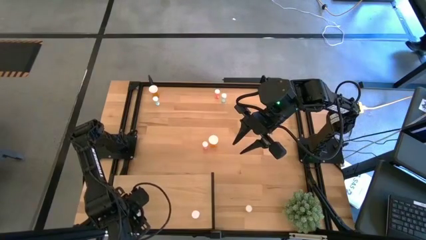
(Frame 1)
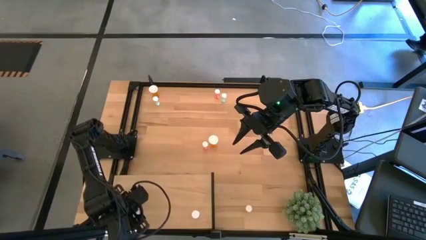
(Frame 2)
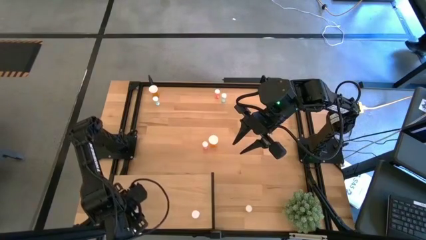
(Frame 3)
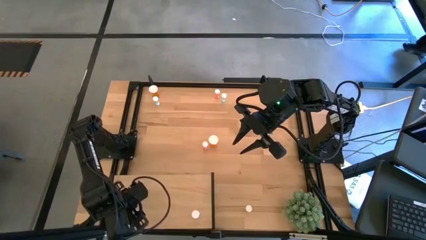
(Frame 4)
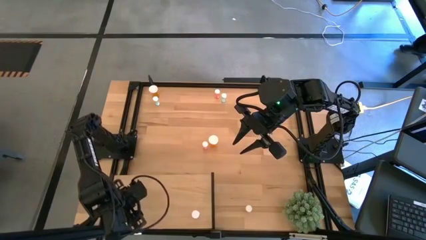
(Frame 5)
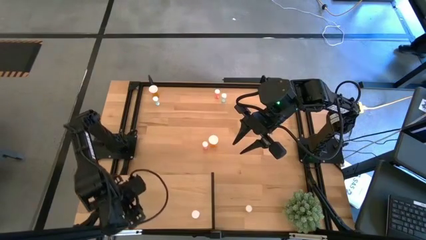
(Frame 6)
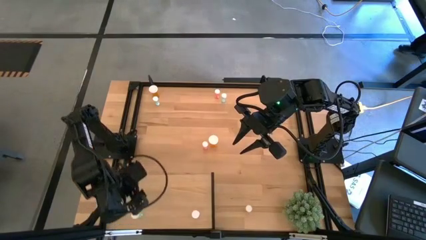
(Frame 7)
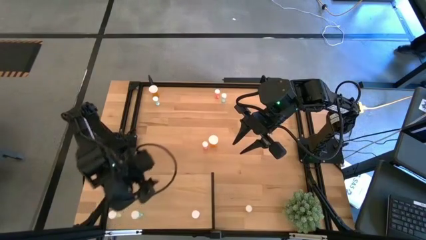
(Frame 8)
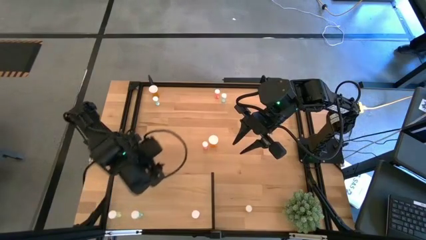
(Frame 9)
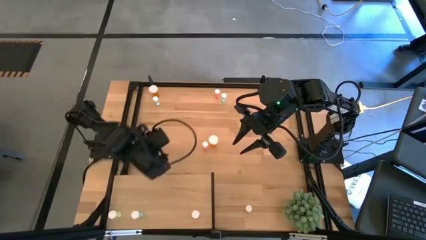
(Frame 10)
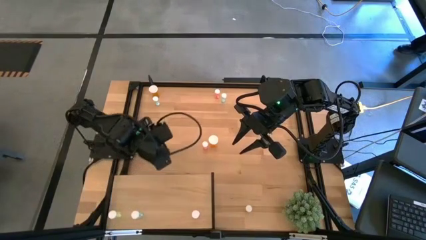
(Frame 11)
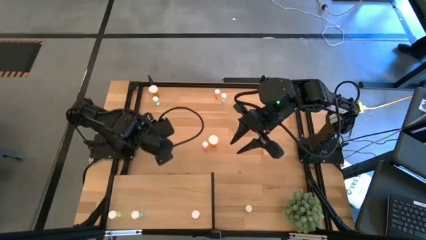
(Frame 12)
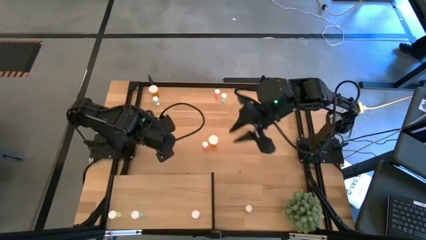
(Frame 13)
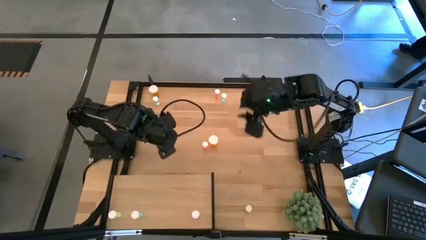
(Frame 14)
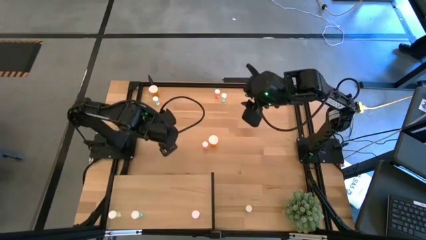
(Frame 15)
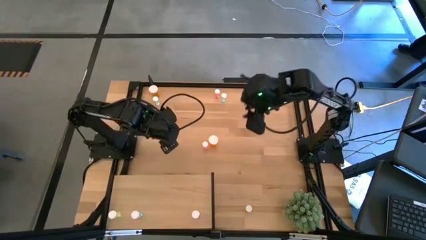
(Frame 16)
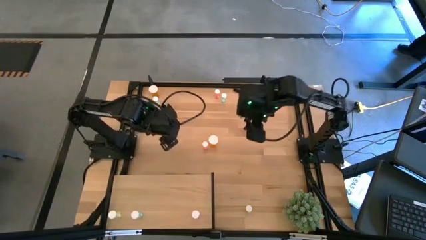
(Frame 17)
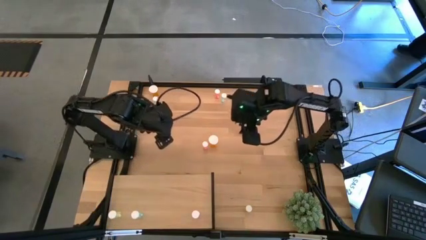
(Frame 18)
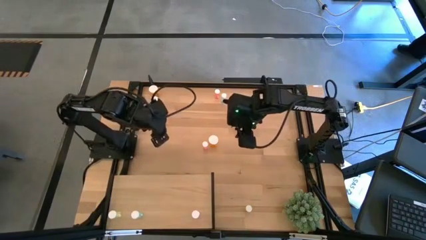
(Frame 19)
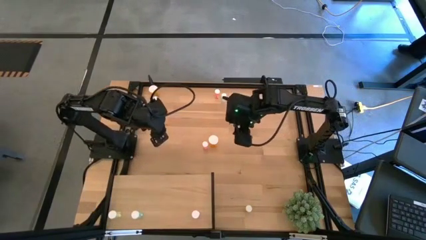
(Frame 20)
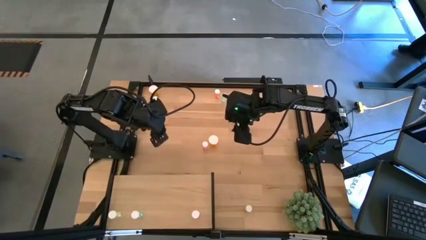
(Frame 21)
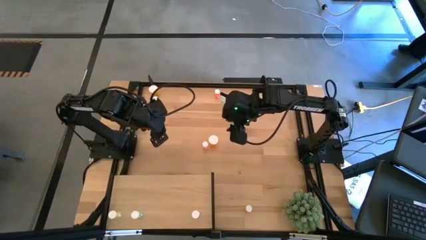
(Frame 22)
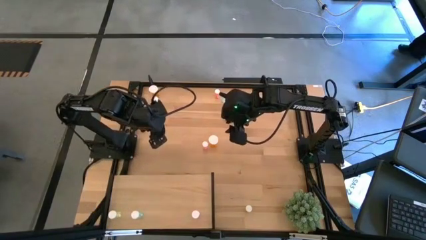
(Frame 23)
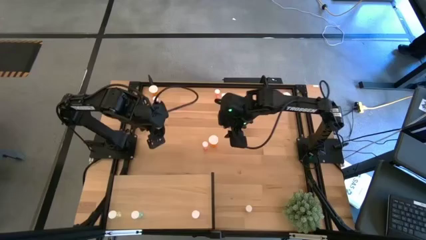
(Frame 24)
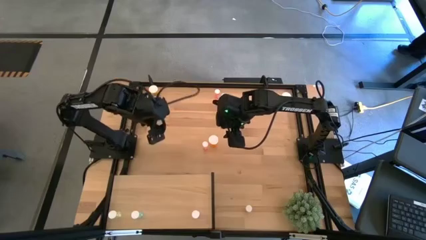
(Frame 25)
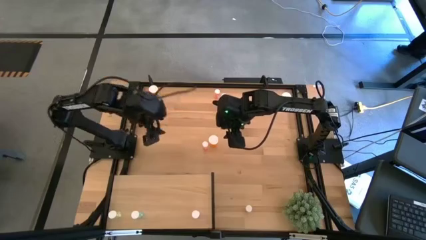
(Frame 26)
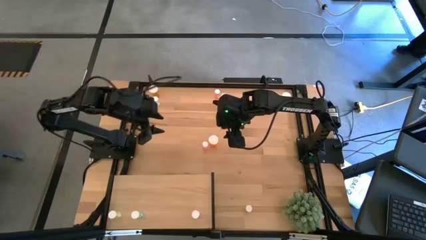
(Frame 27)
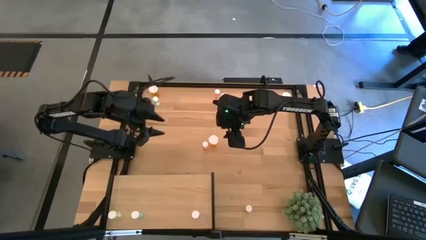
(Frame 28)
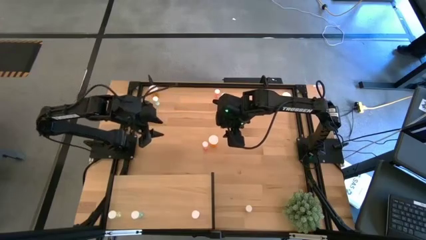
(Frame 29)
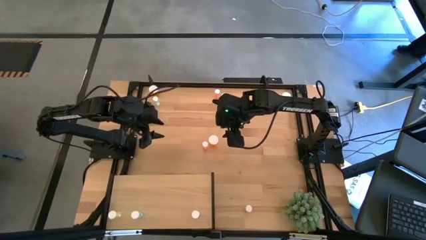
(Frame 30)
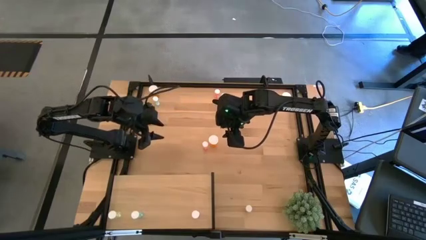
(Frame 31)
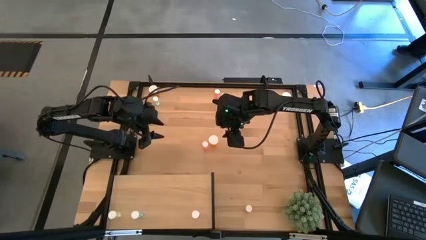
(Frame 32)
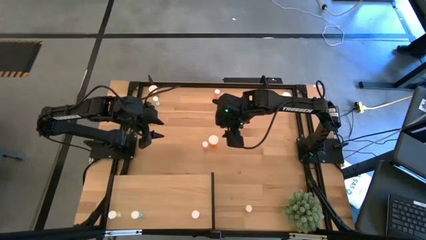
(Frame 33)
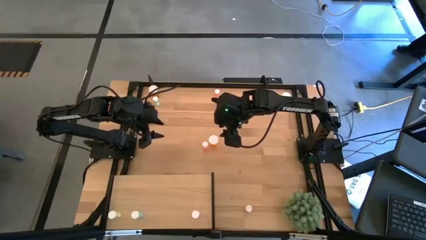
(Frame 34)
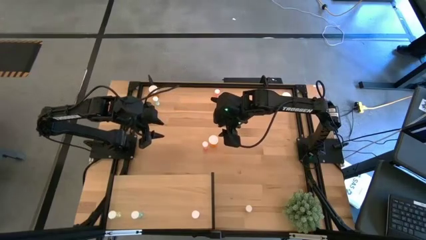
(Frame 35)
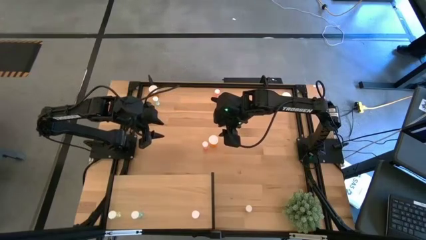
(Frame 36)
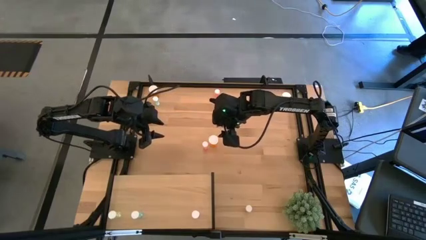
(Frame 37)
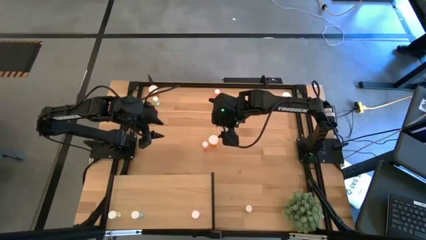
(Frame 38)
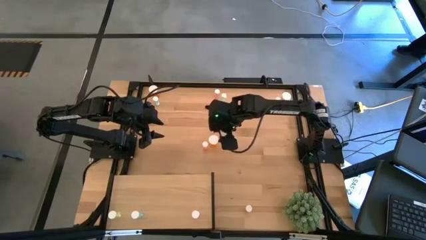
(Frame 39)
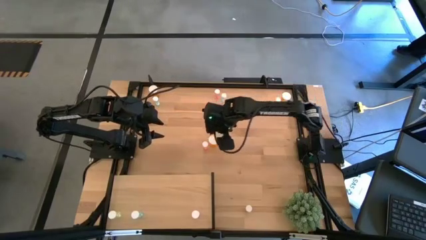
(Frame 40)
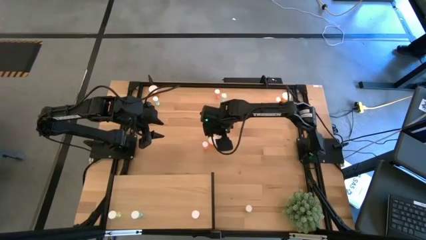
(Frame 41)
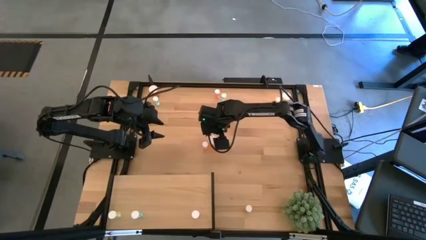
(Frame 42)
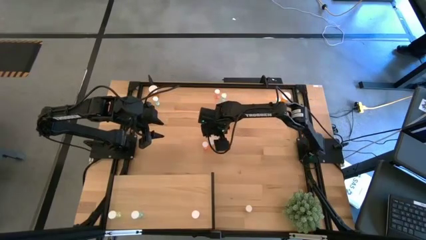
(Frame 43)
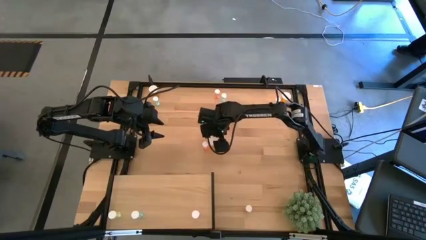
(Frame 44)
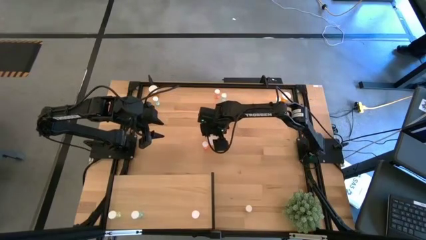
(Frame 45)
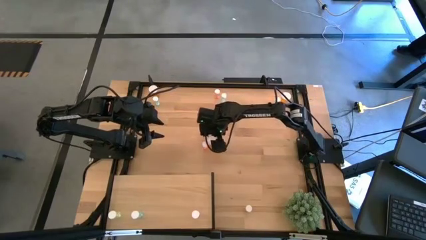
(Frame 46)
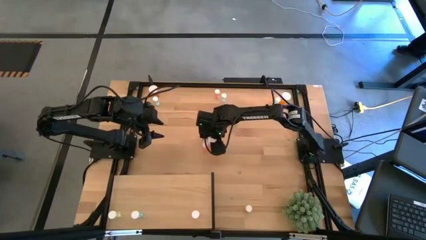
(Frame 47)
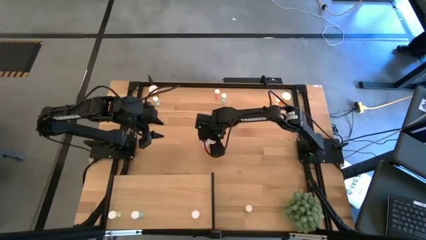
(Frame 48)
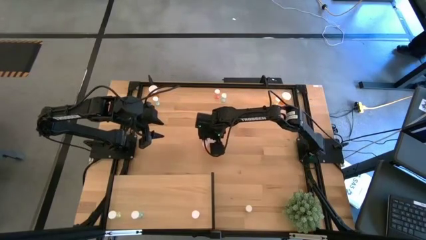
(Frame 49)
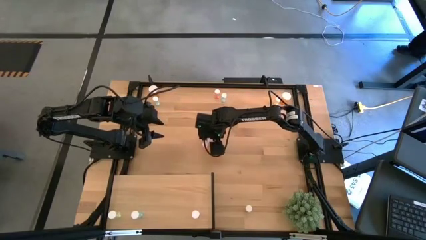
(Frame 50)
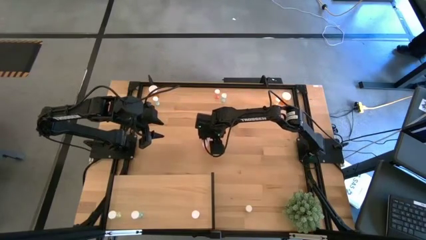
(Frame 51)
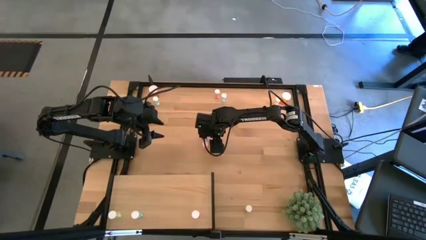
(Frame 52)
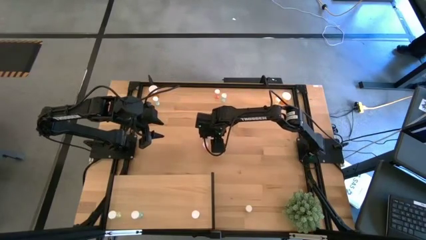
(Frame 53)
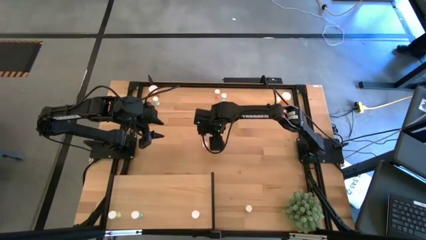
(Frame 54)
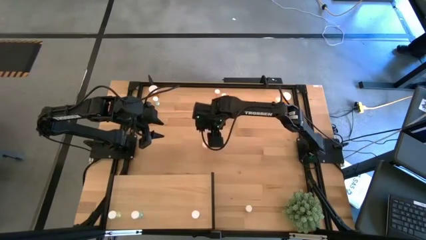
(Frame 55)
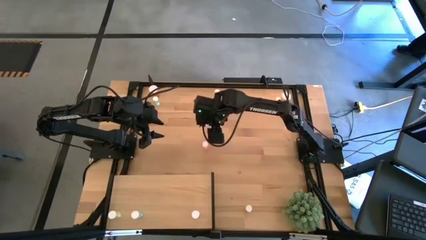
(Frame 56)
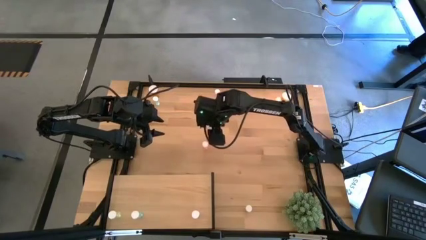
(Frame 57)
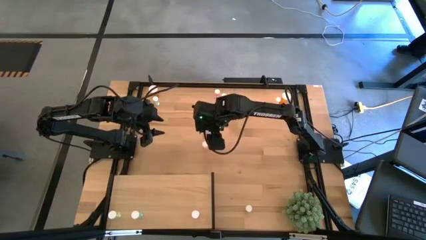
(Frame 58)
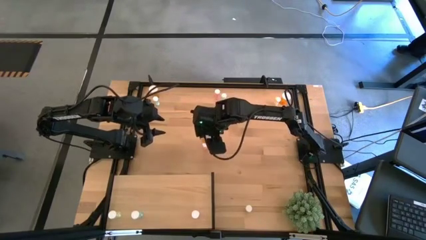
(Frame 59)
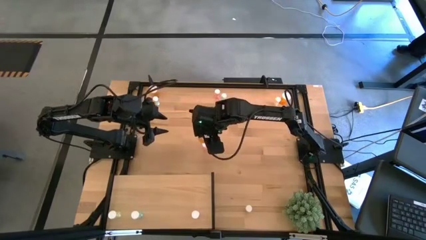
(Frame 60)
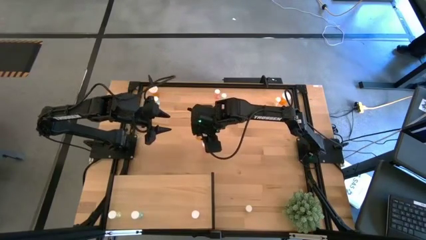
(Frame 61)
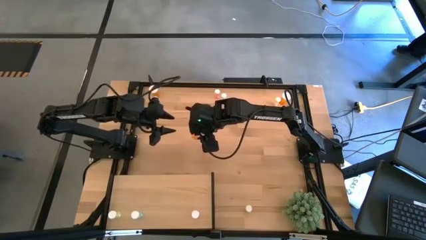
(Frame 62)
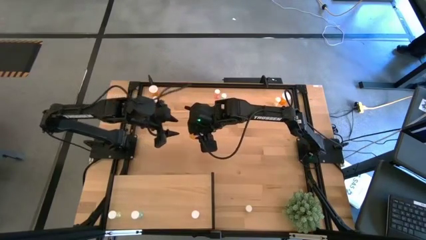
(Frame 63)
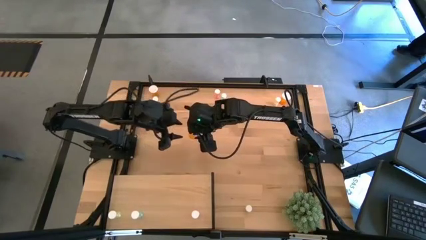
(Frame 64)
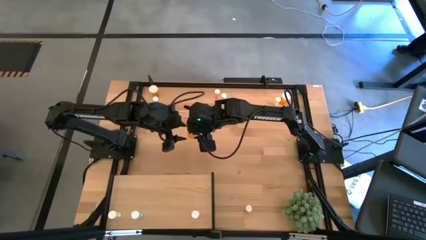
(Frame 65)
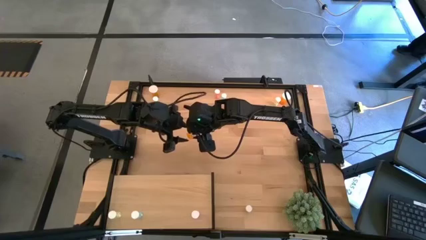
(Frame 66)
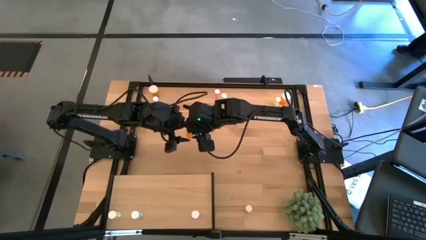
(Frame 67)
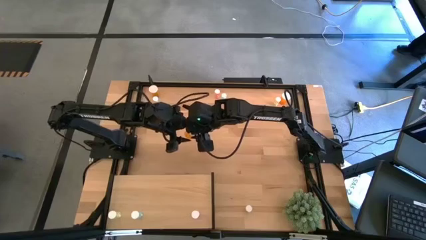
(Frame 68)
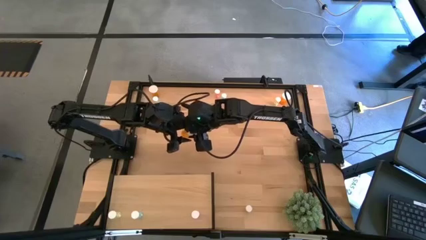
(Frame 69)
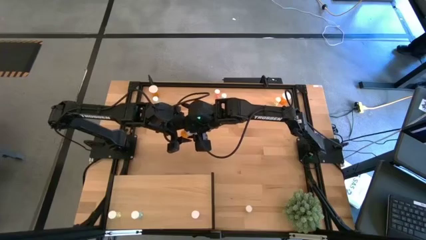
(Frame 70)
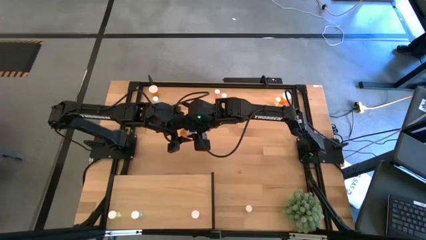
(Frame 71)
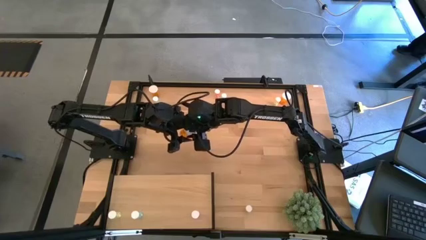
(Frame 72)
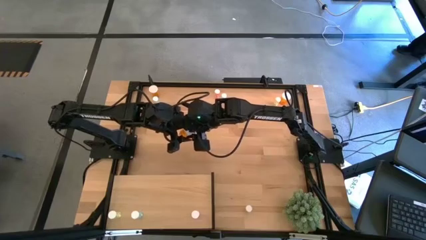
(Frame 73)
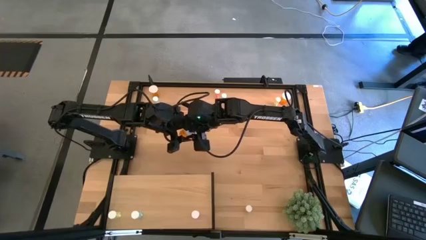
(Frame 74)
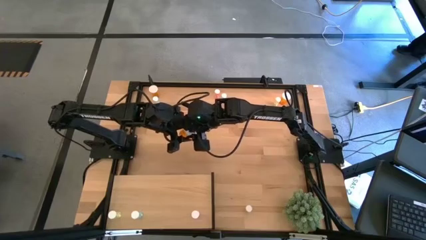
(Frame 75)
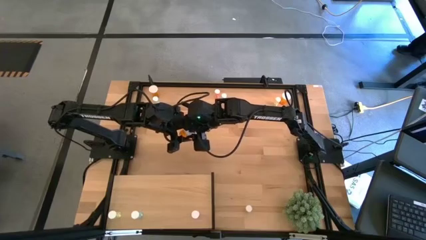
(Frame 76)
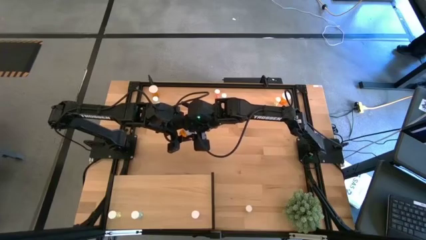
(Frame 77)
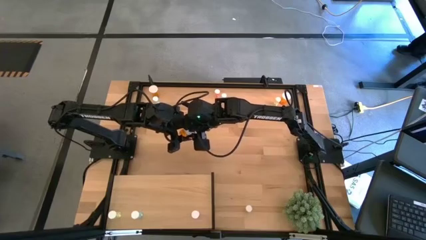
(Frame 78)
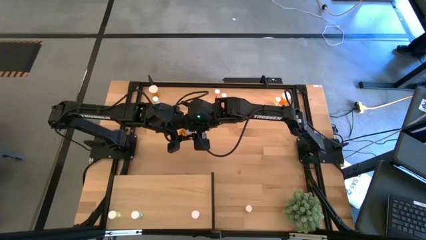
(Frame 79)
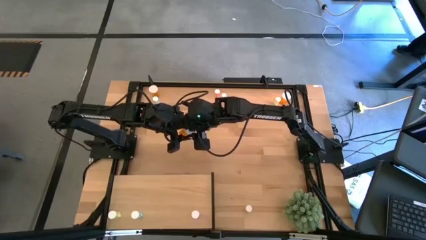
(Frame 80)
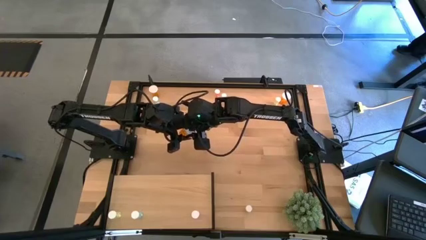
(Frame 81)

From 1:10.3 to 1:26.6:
Task: Pick and place medicine bottles onto shelf by color
Put the middle orange pill bottle on the shelf

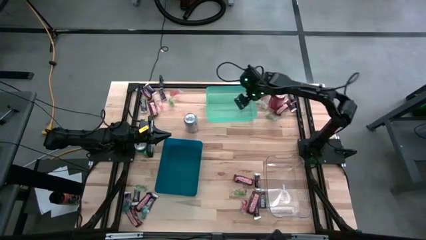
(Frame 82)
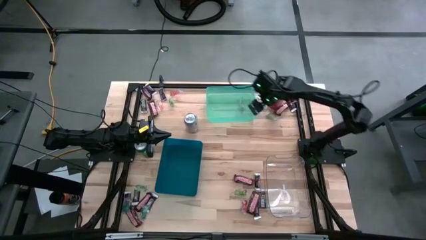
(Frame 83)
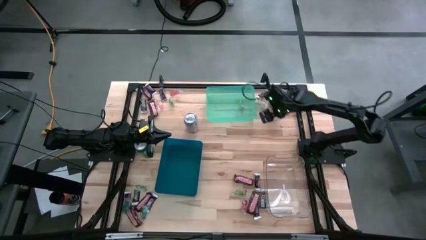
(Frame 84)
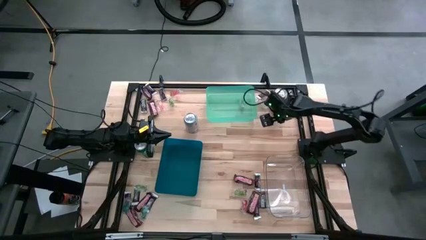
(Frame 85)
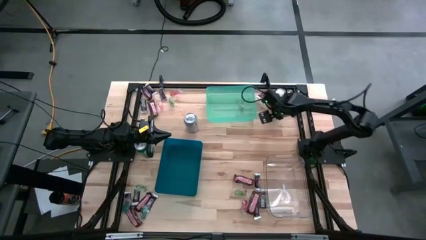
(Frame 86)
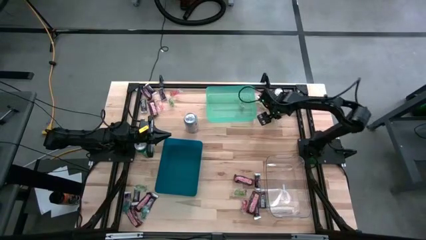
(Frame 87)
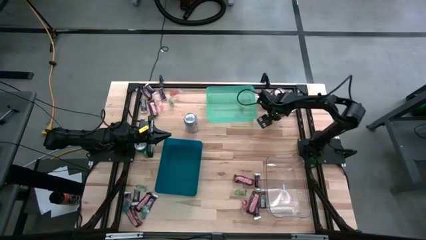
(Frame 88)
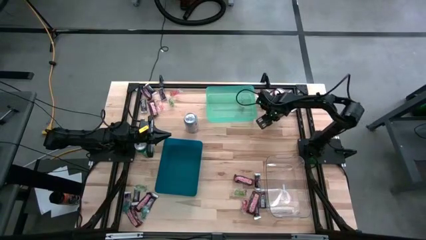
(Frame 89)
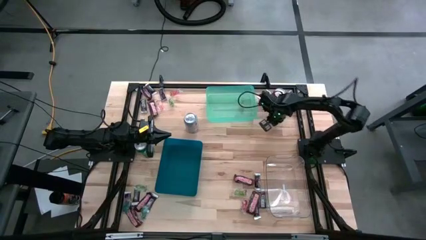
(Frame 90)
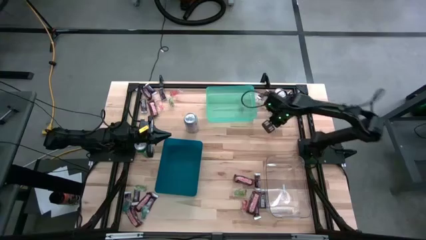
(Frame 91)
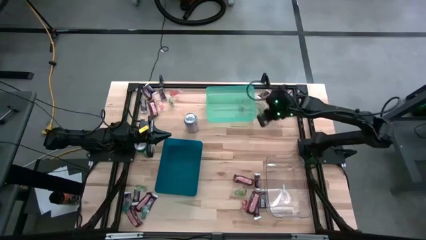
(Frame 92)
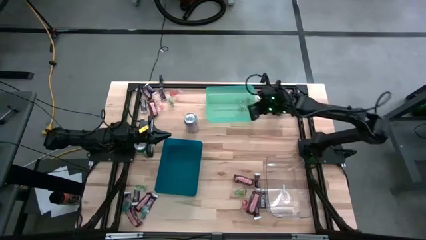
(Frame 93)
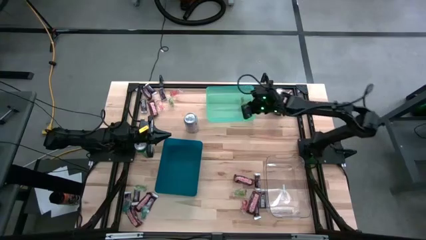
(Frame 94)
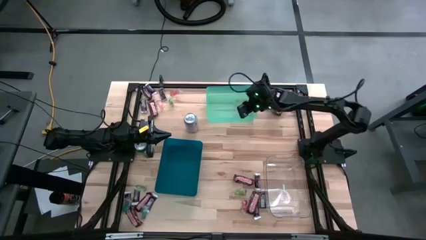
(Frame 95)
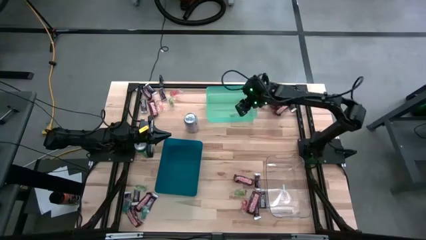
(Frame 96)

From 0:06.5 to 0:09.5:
Task: Organize candy in baskets
Put the transparent gummy into the green bin
